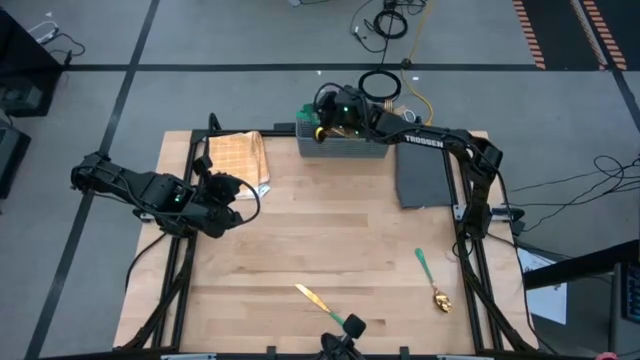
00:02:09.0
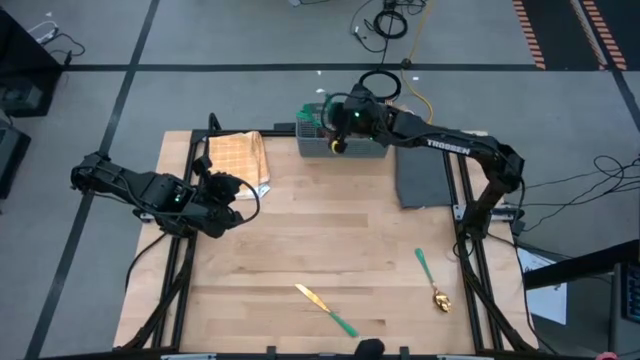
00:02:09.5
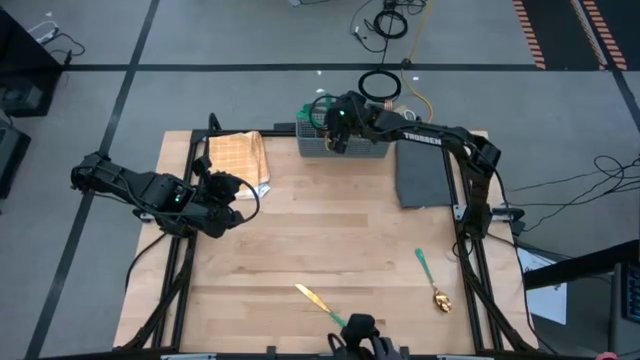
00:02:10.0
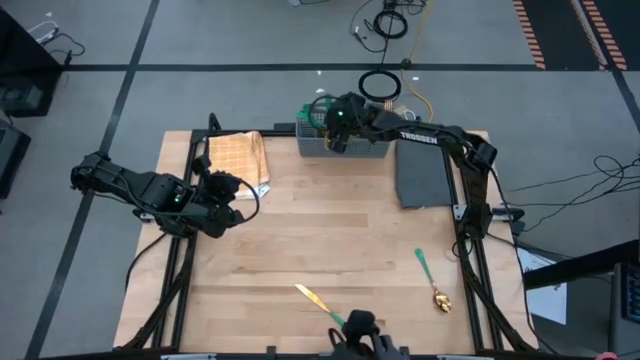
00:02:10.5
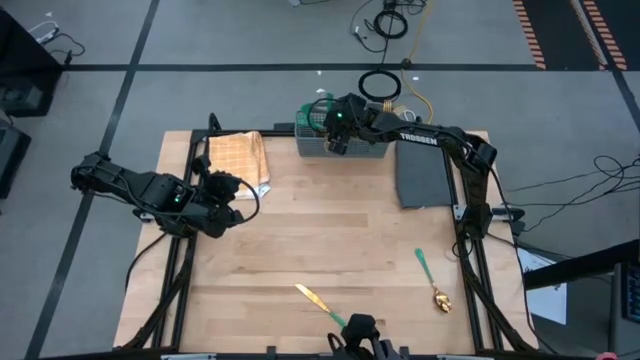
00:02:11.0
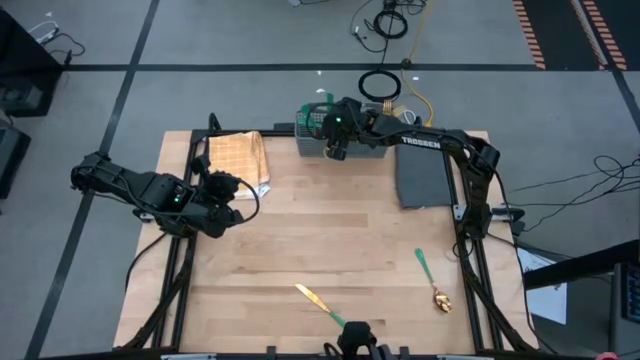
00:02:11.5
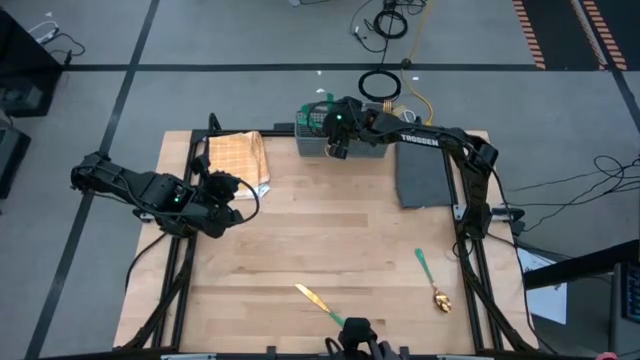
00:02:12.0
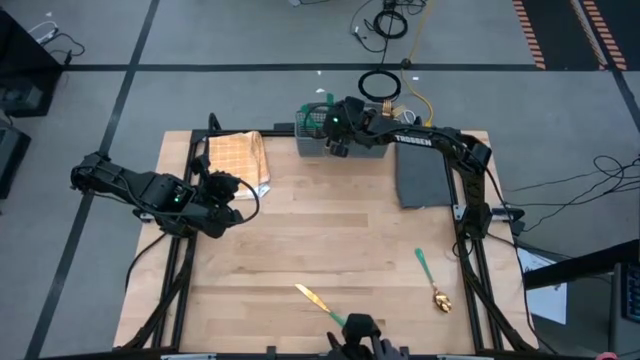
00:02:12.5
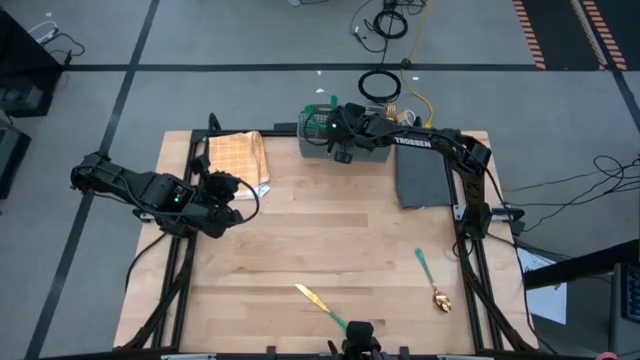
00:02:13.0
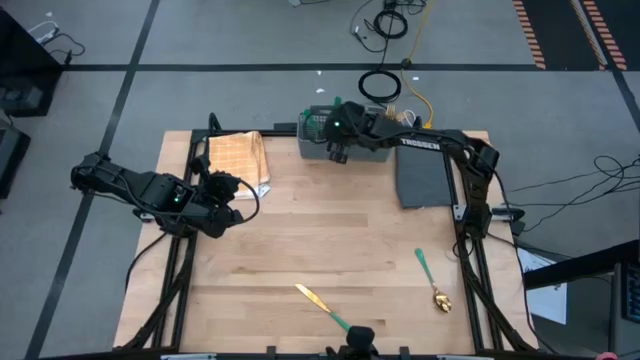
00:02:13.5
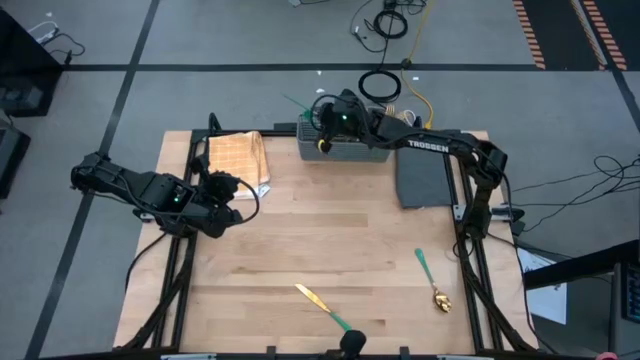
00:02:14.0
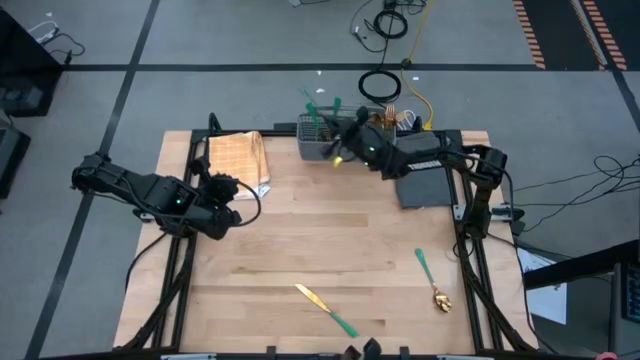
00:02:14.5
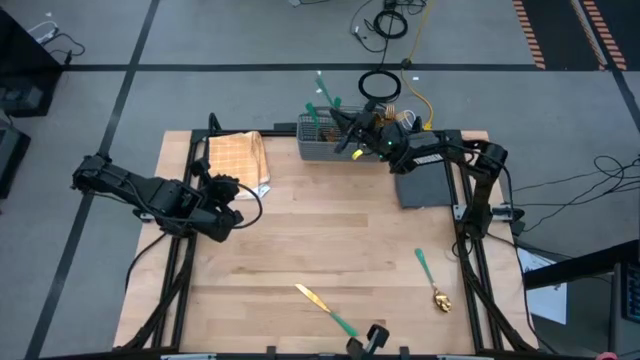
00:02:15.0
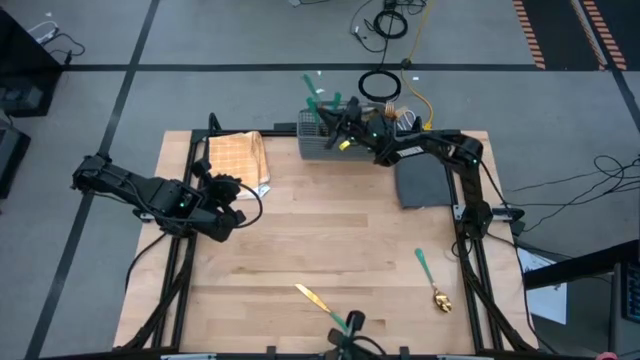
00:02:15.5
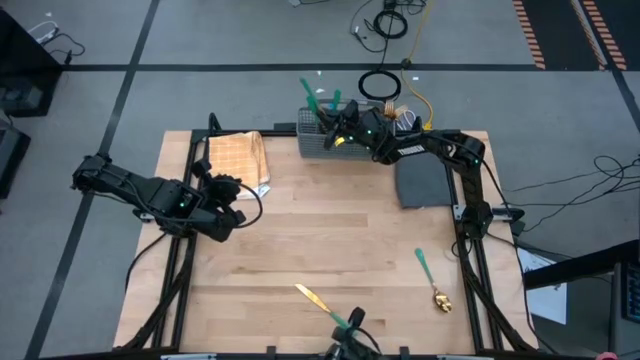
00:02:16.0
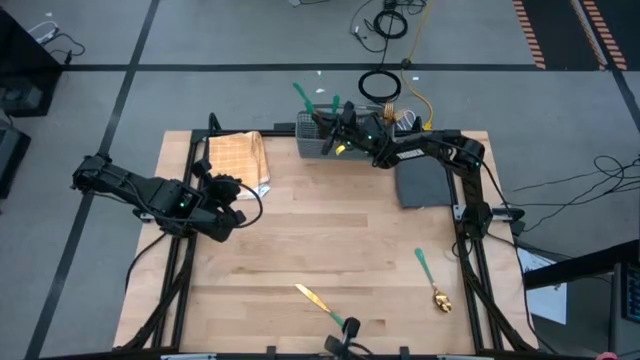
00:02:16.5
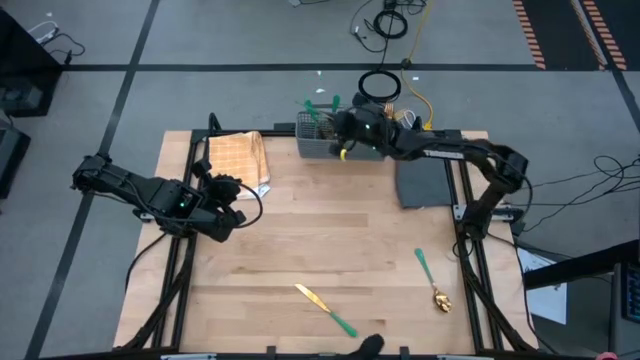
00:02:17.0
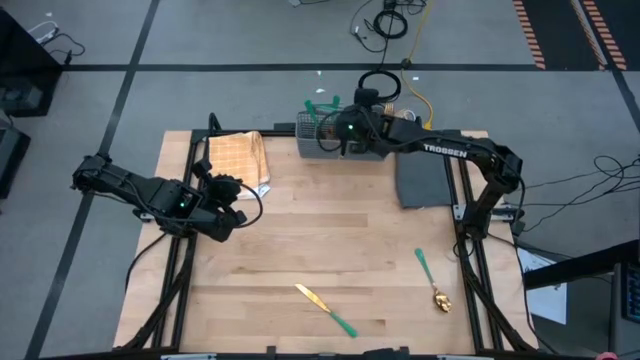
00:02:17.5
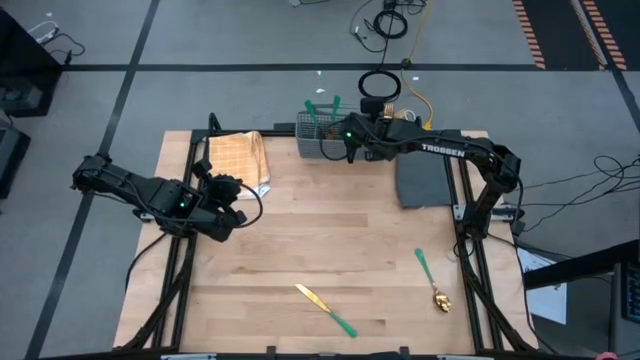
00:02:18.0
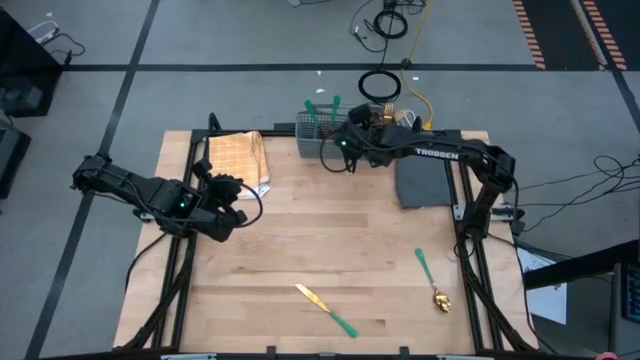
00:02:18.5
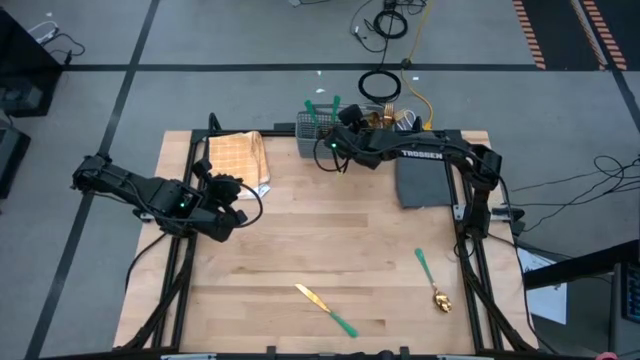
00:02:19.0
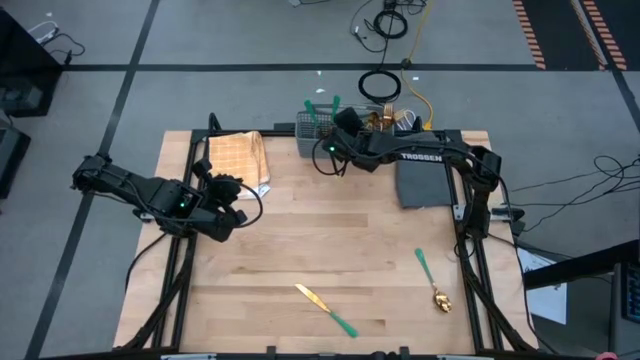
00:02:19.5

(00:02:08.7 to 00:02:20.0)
Task: Sort silverware
Put the knife into the middle left section of the dish rack

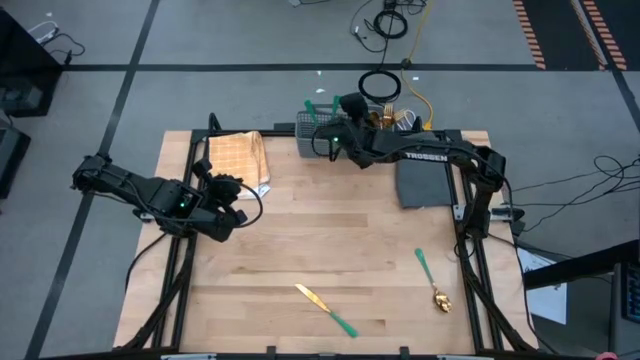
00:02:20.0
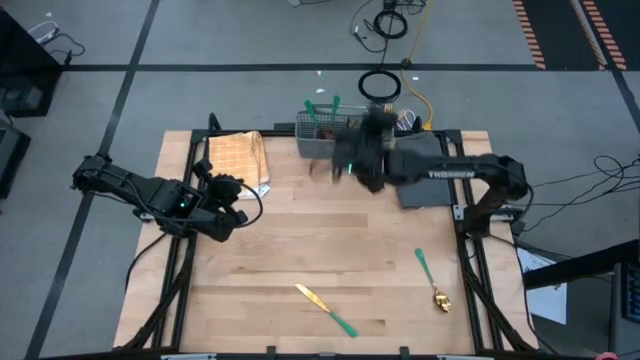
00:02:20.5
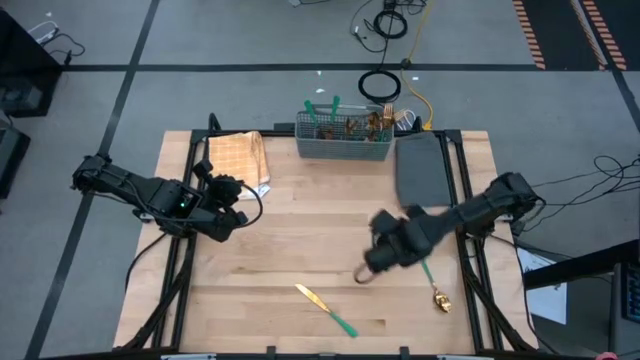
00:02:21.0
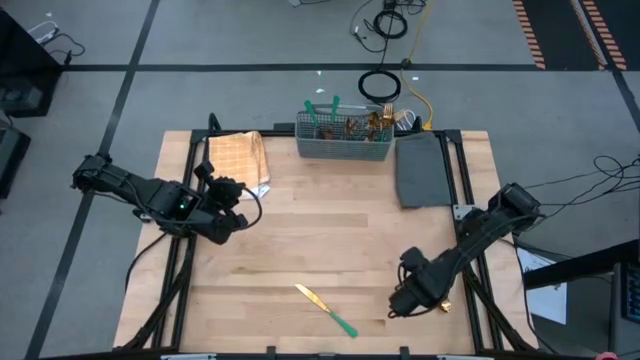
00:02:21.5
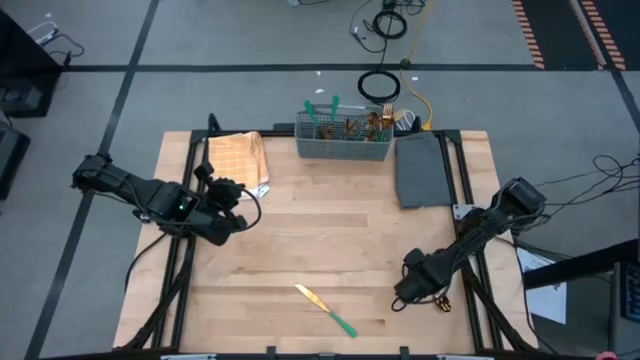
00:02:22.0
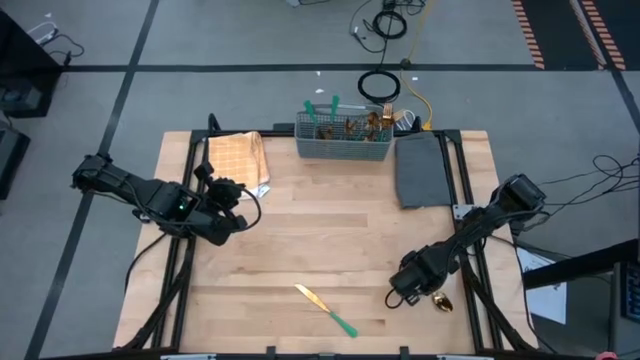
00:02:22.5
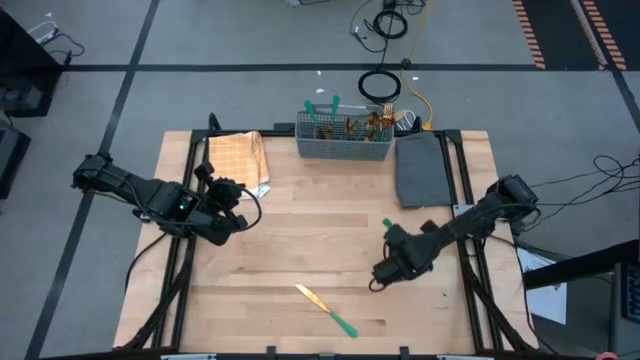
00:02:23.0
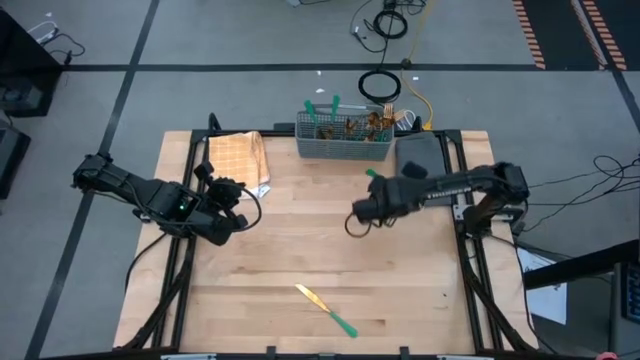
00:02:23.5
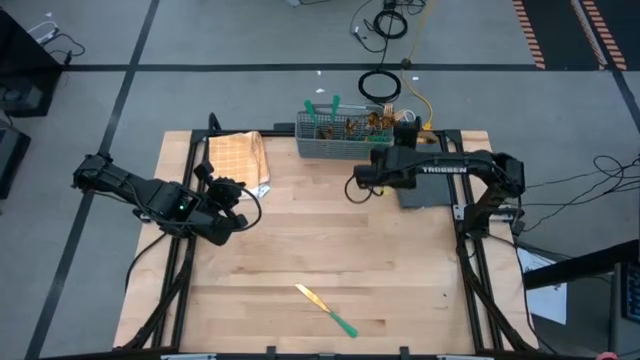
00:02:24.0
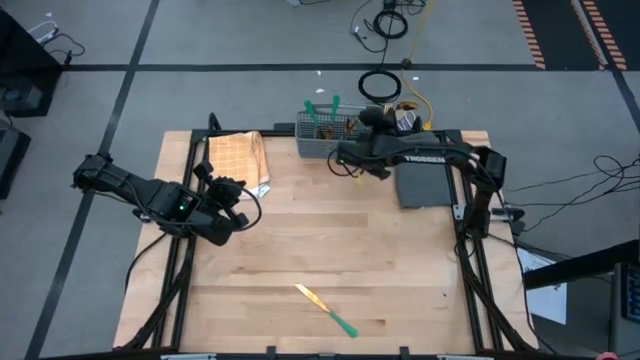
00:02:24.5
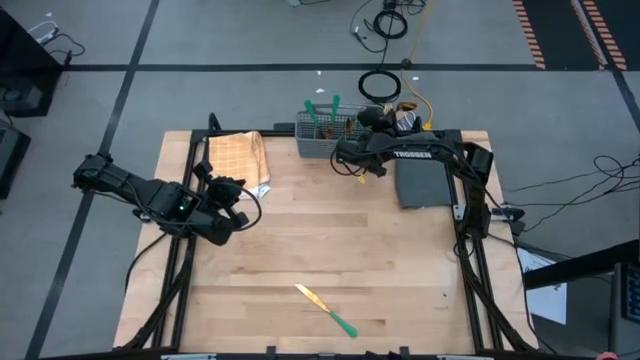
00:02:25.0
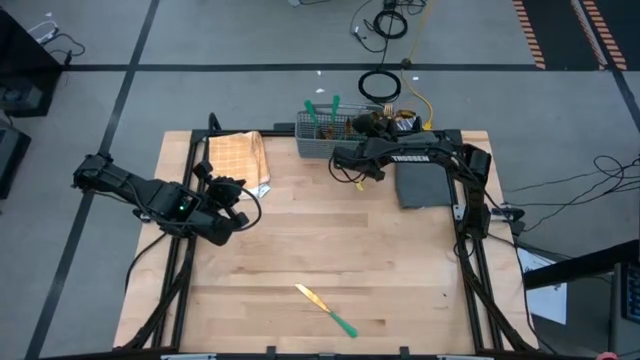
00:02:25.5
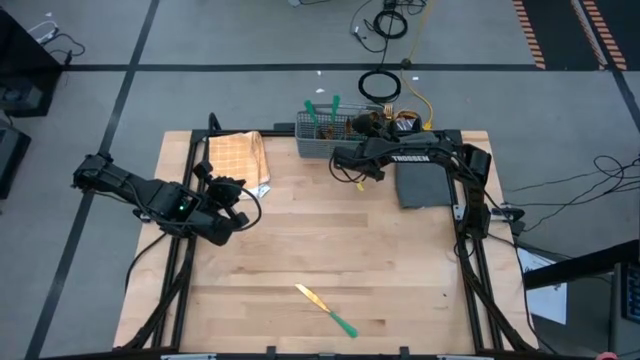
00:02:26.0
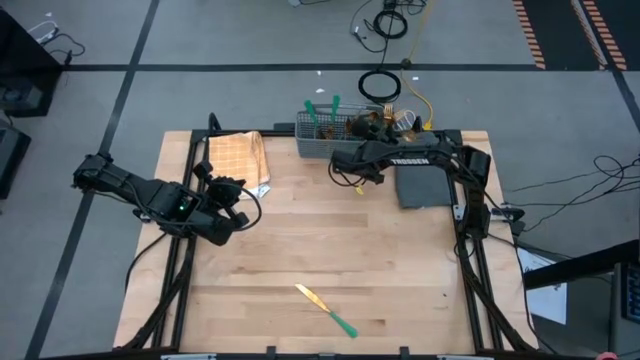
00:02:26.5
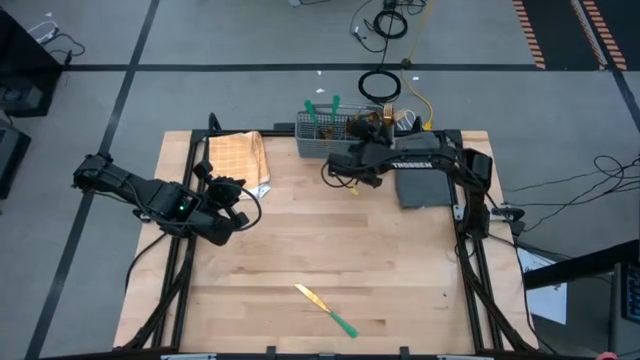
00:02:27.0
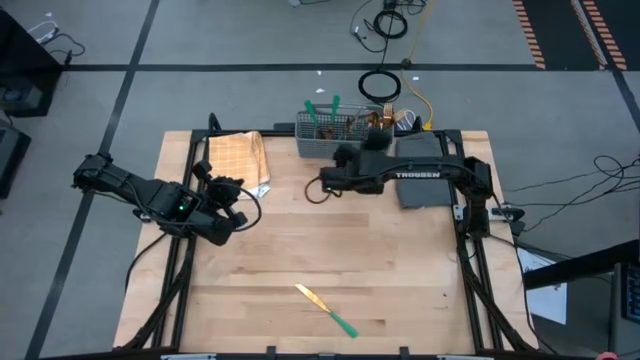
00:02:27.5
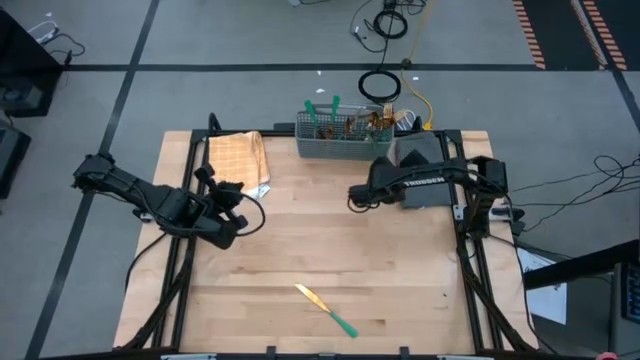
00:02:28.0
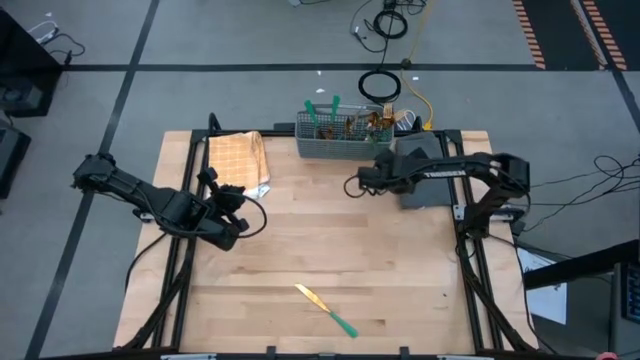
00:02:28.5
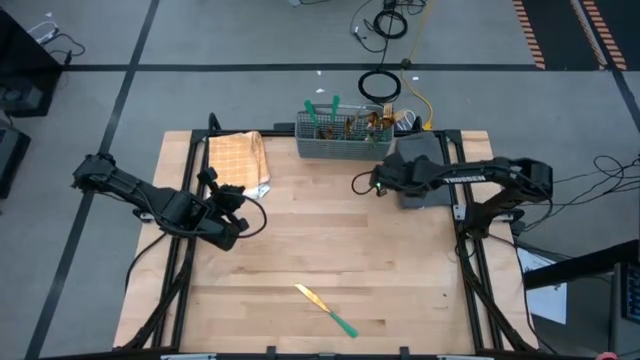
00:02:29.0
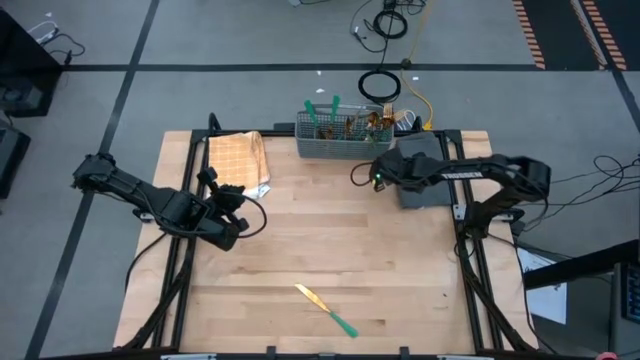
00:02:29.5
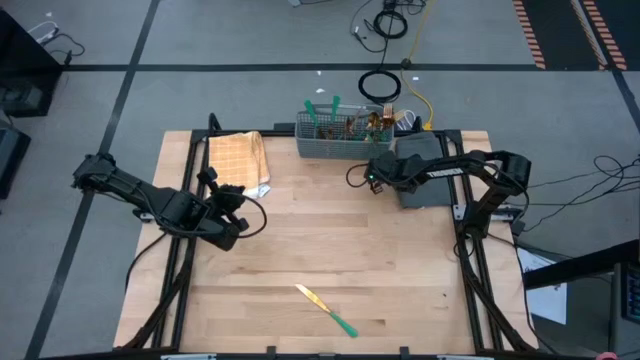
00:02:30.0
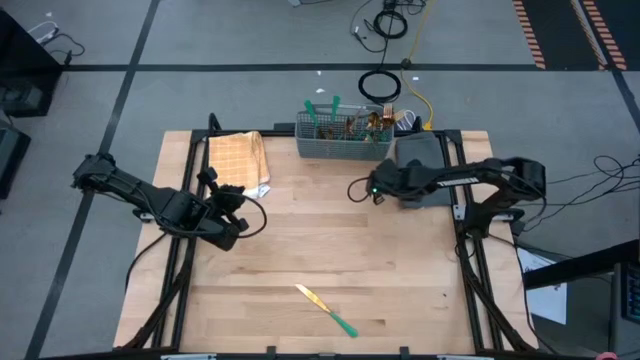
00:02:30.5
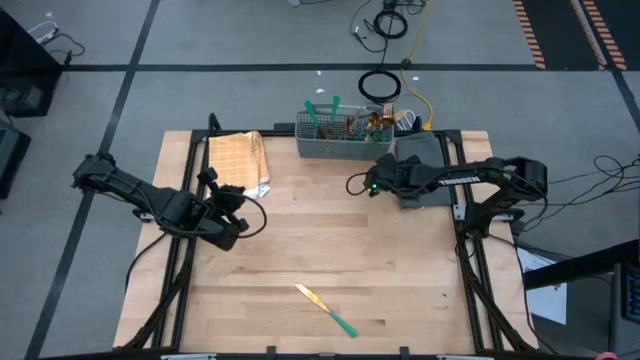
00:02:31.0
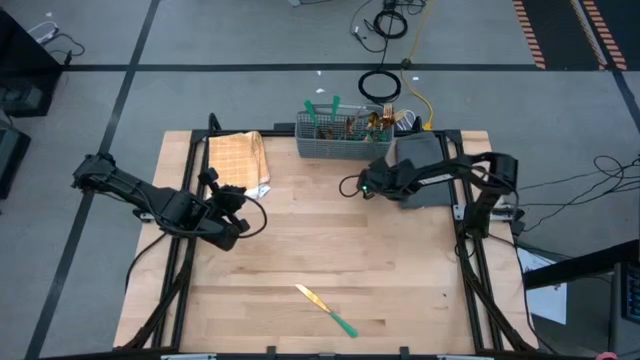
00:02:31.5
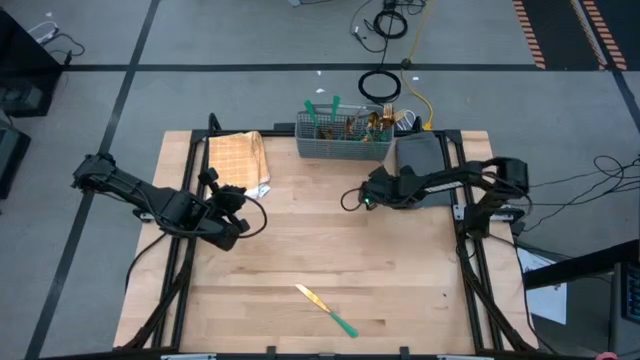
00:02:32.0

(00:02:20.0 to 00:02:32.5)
Put the spoon into the middle right section of the dish rack
